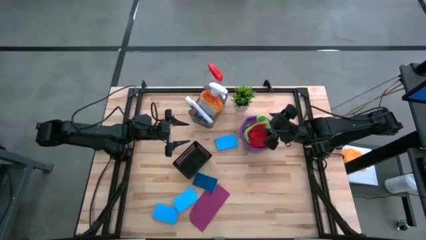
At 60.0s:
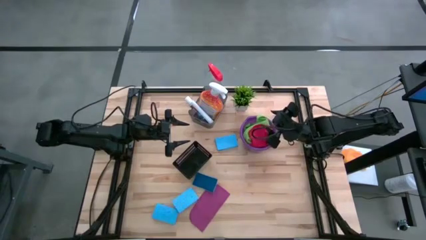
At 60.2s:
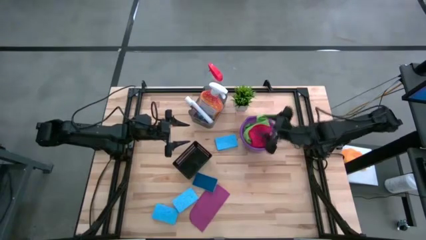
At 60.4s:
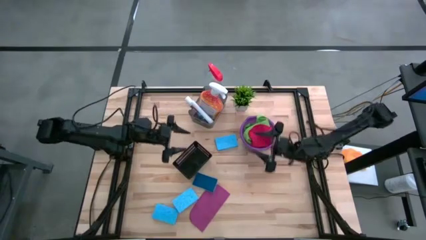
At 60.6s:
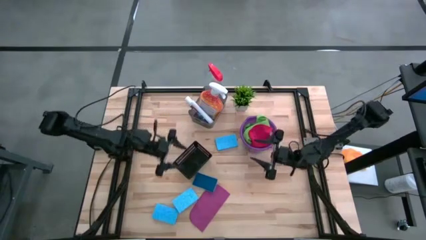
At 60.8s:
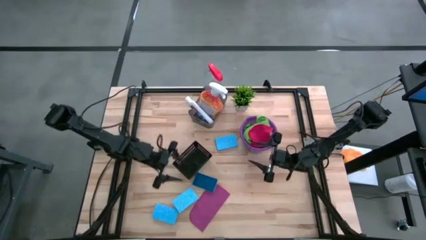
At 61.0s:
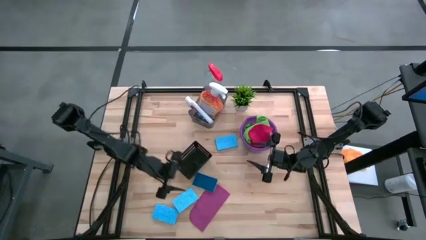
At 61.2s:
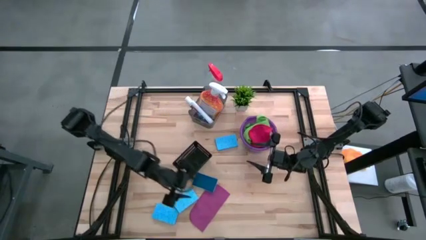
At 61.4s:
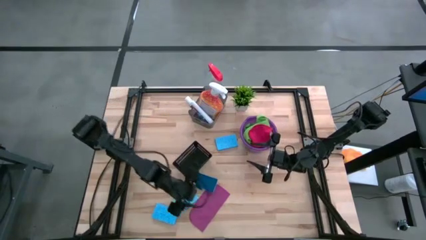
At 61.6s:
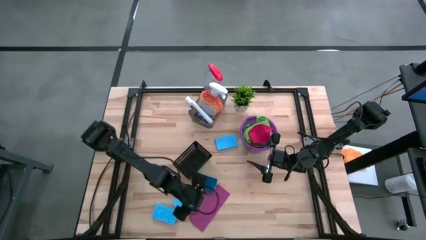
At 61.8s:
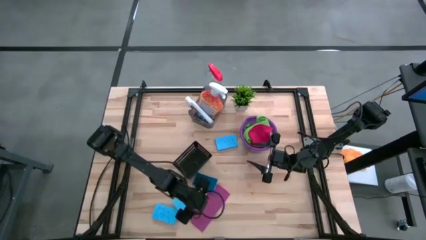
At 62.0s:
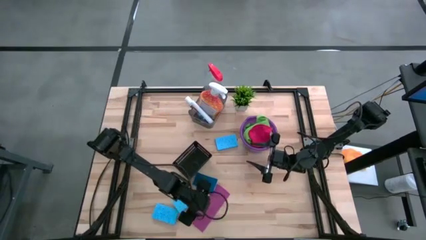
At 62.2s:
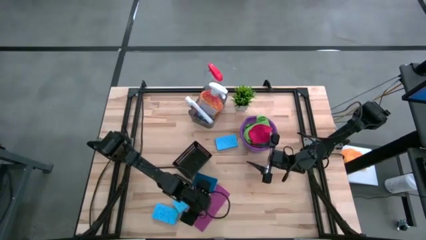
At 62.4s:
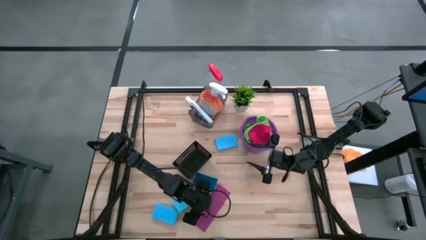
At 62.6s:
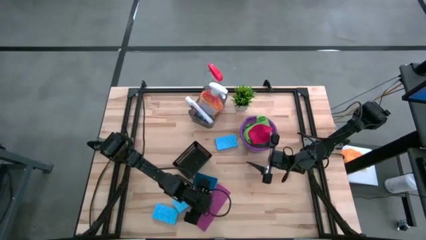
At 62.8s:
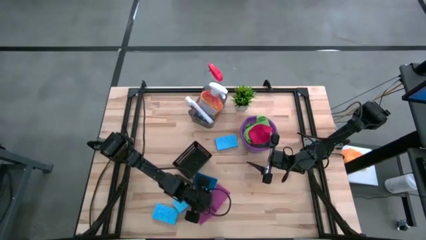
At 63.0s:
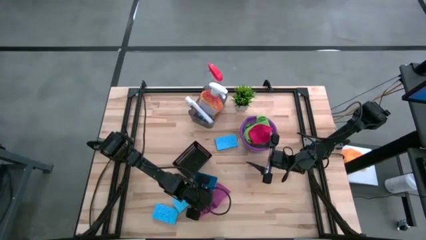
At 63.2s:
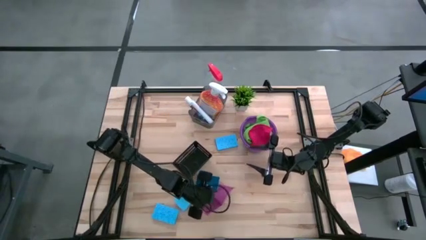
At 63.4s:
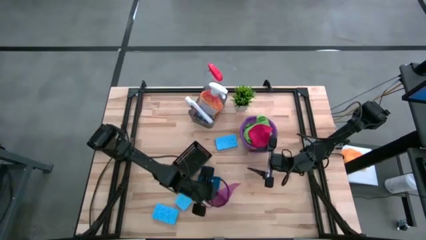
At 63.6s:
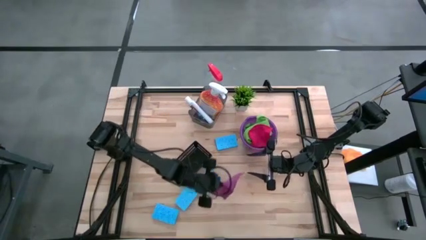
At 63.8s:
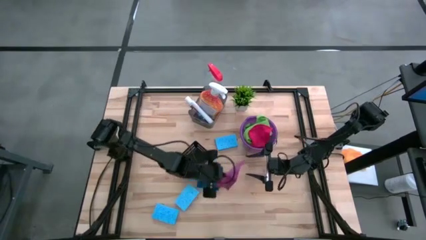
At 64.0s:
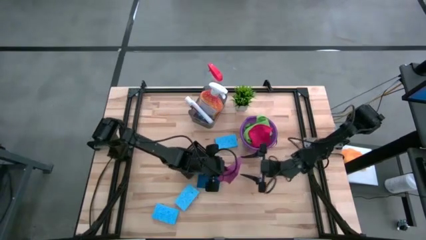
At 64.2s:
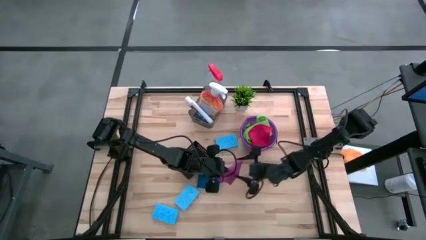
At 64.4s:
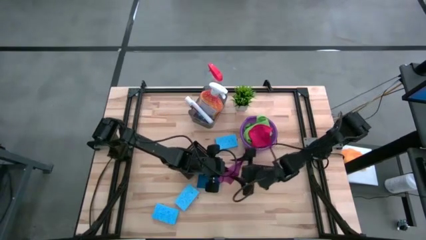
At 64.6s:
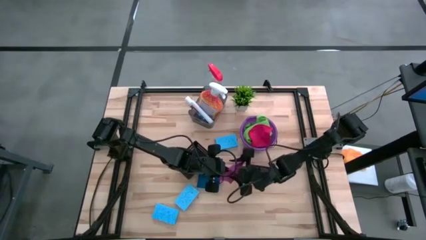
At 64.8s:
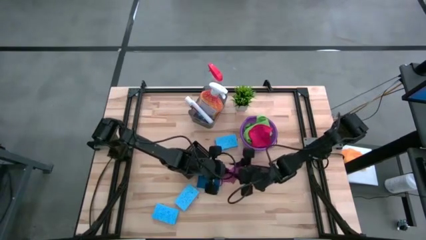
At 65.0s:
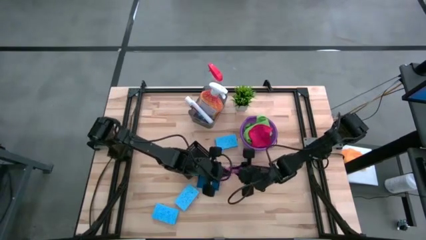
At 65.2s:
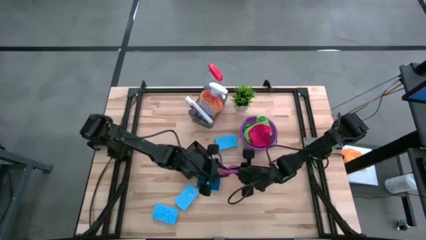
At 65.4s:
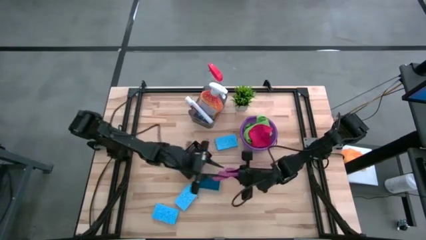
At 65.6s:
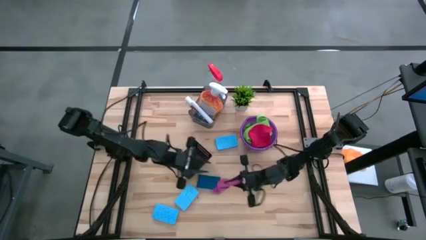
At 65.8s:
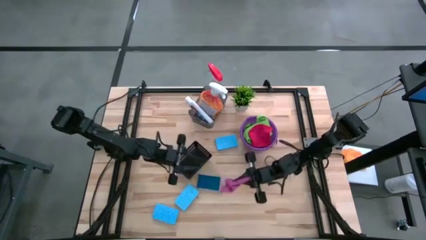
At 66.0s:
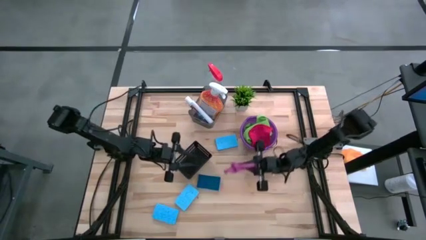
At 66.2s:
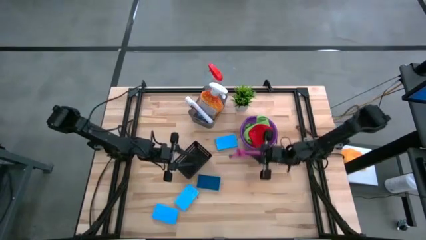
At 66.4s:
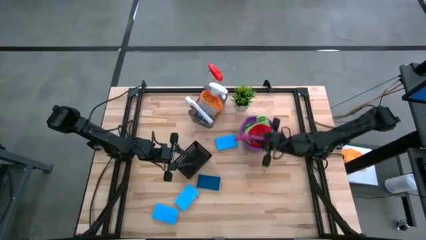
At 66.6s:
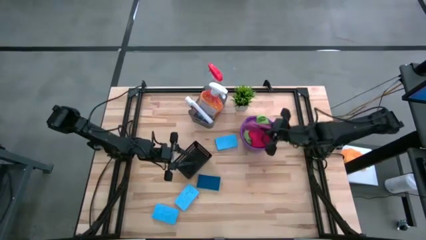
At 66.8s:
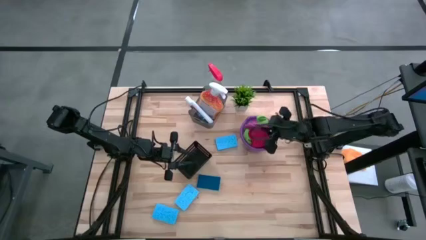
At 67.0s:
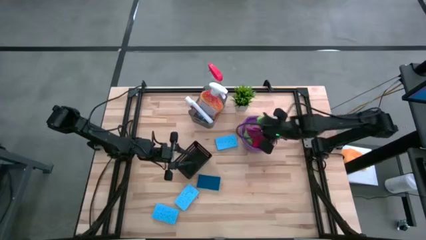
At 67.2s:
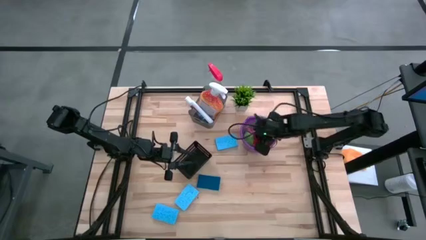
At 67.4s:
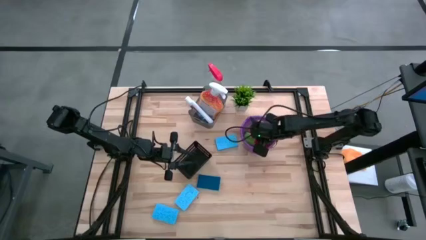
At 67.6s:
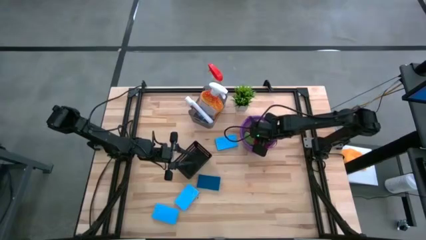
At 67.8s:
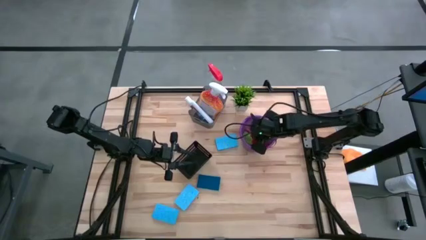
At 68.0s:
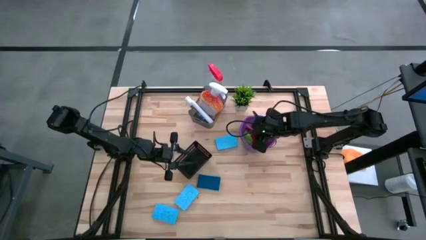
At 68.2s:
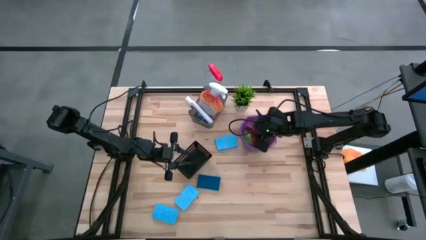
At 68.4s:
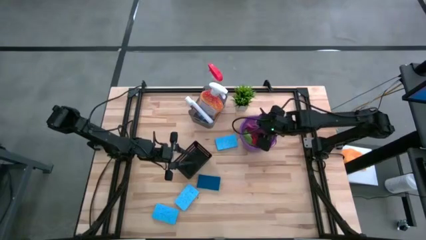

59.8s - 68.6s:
Task: Pick & Place Kitchen Items
Put the violet microfiber cloth into the violet bucket

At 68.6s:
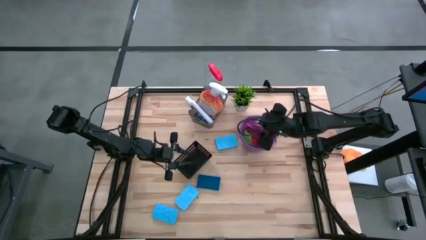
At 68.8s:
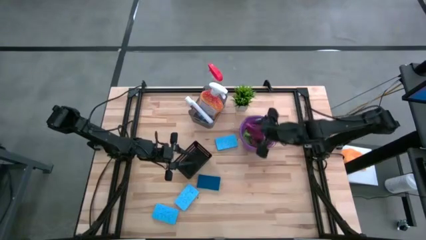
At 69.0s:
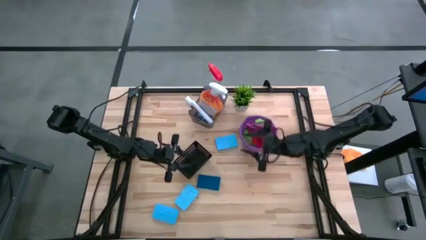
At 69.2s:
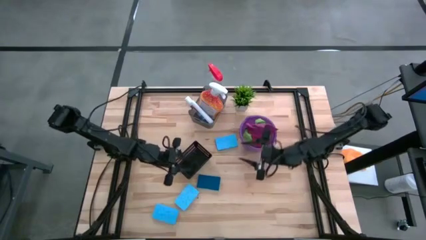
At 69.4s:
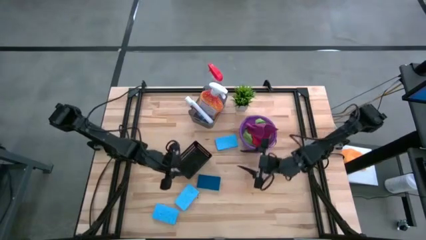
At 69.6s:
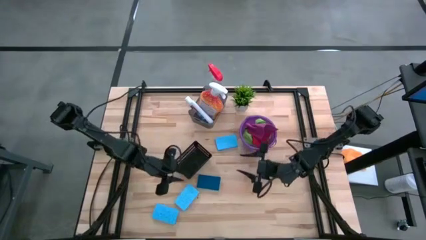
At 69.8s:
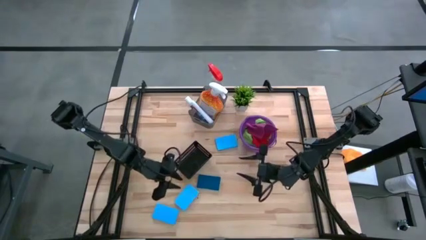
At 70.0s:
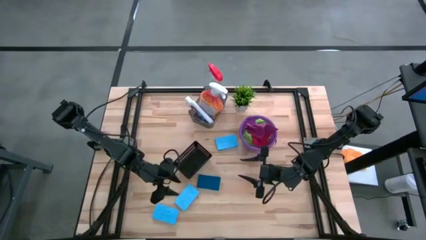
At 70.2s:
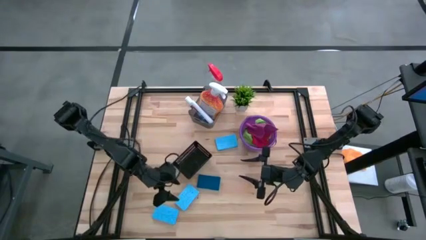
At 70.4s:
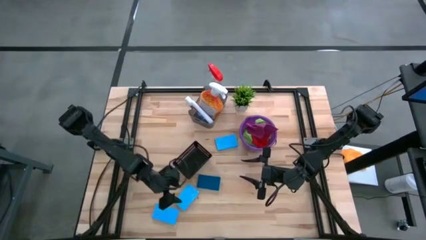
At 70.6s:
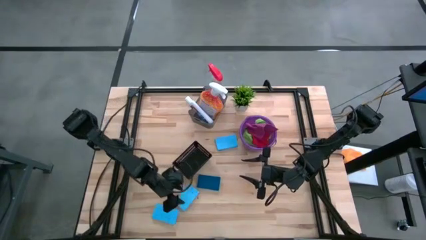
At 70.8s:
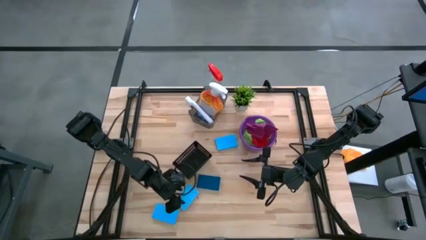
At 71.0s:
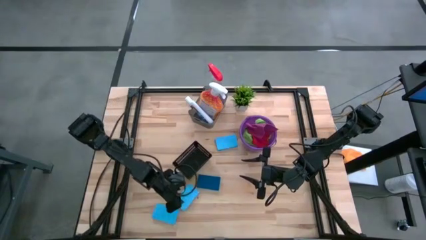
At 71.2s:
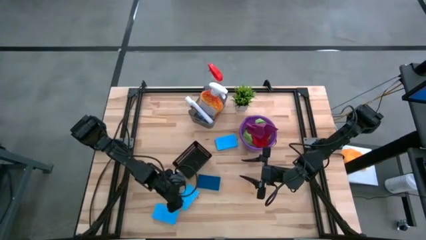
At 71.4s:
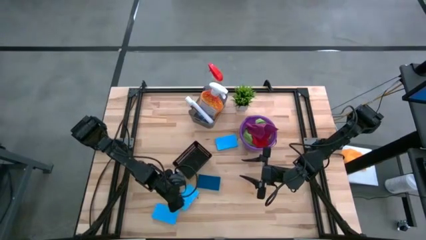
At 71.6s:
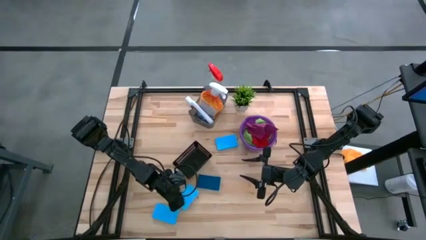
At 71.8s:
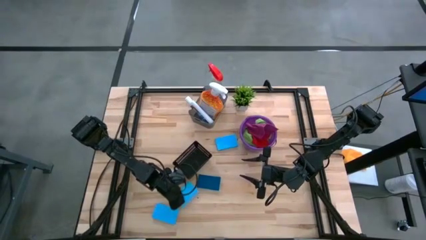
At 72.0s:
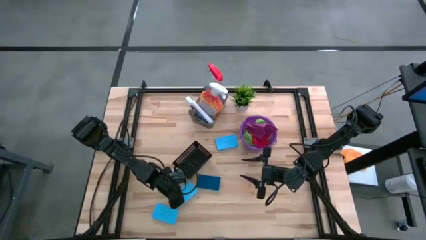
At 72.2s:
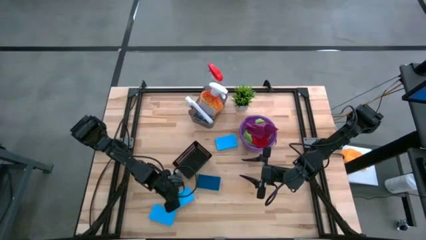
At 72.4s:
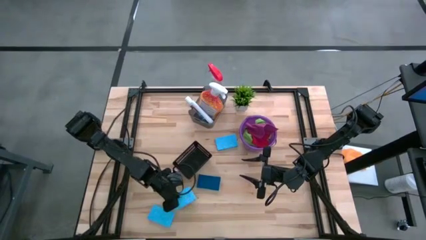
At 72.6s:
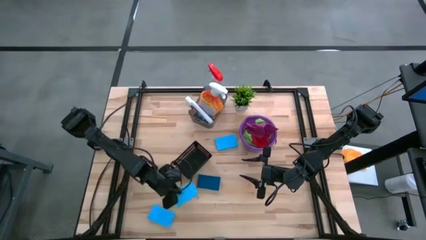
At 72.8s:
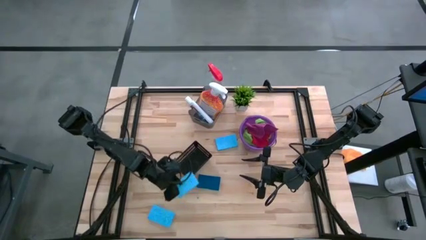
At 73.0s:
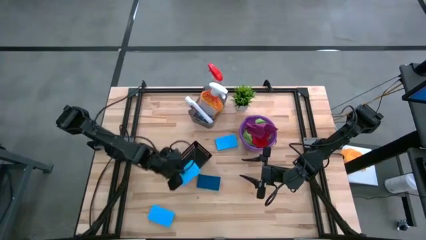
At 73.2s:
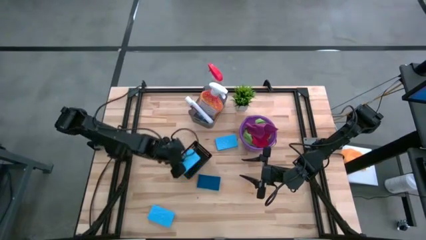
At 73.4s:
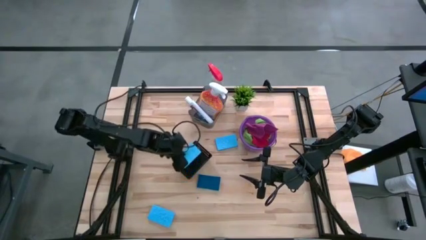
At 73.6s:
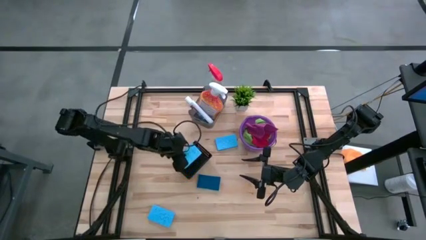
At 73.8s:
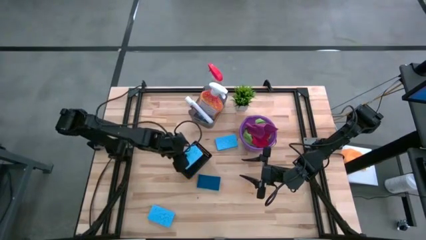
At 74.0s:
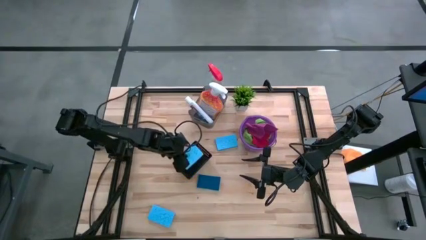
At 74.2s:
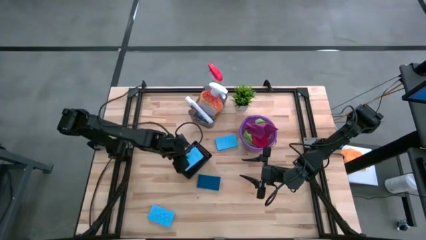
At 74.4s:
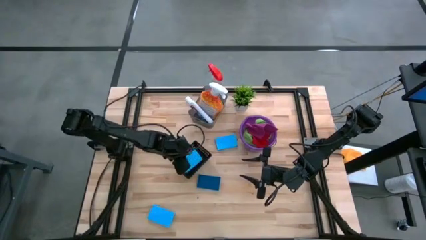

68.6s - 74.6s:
Put the blue sponge into the black basket

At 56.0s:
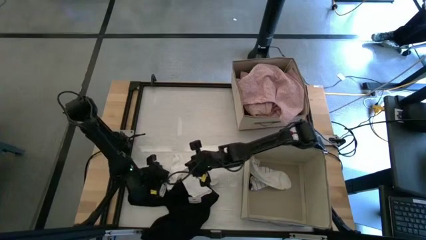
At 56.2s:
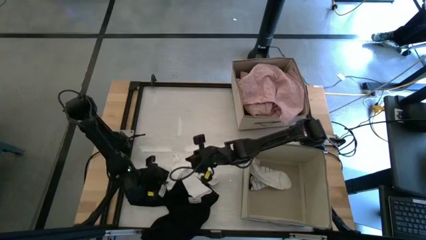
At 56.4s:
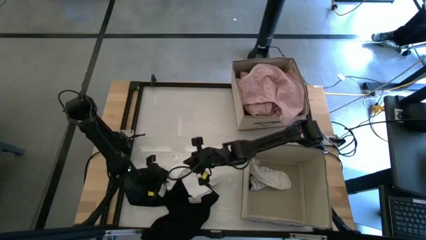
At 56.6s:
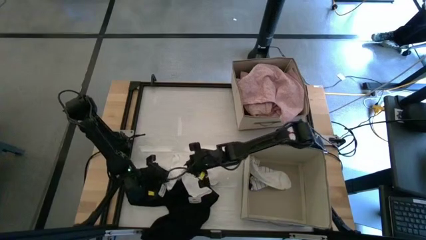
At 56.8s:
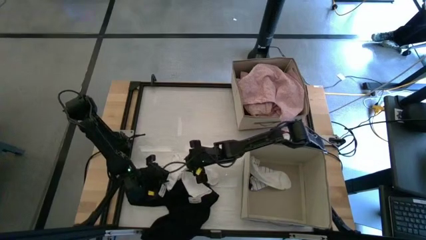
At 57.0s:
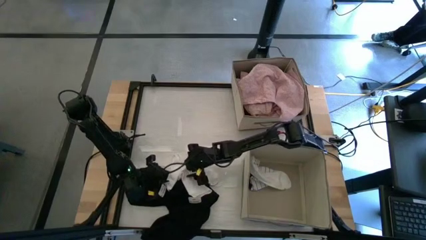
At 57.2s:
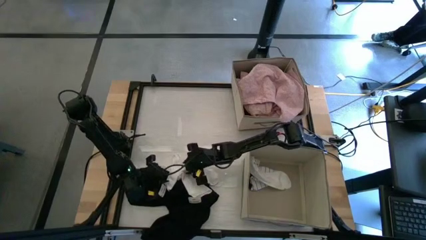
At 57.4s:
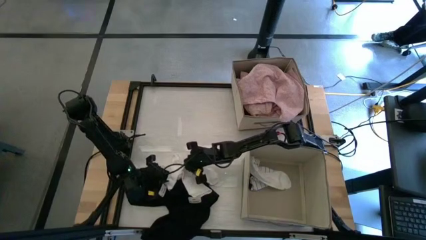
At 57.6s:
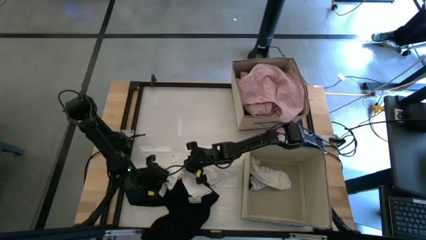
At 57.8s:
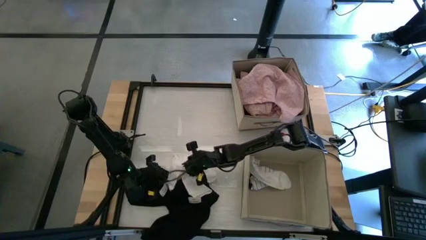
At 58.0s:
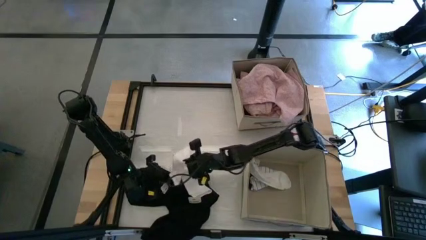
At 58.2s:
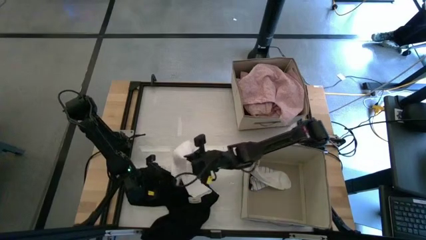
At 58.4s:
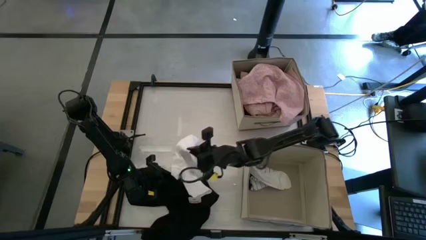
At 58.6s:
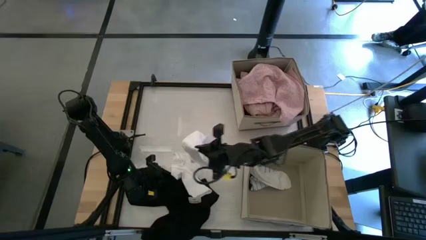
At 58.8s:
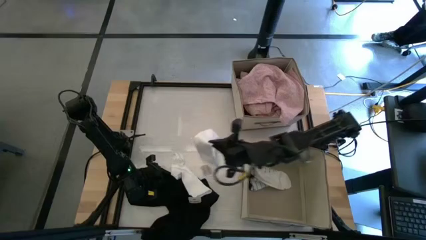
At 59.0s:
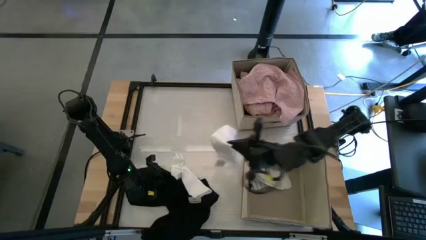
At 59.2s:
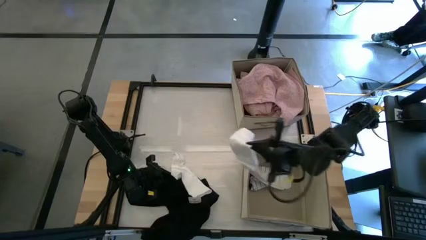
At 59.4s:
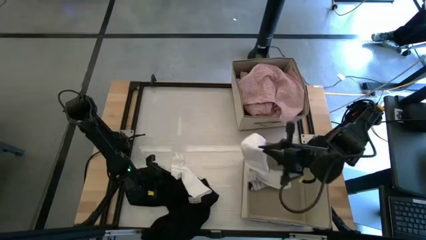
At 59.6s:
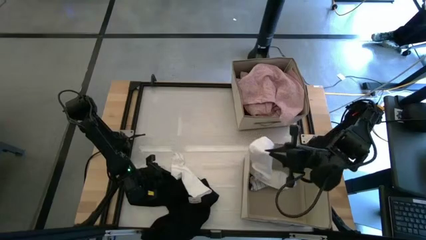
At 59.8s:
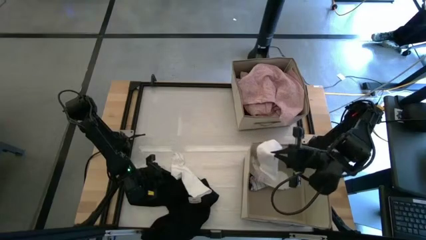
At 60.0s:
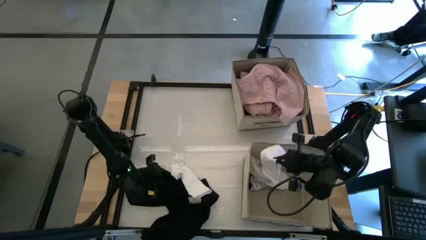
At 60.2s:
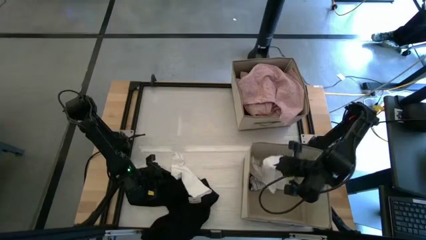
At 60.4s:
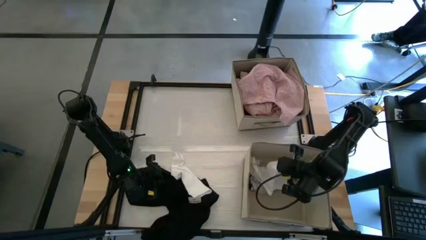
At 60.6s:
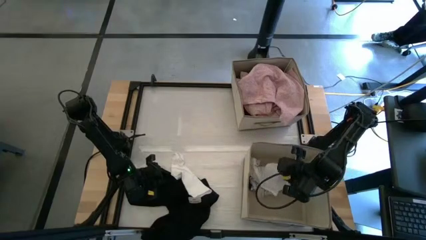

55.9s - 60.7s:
Task: Sort clothes
Put the white sock into the bottom laundry organizer
